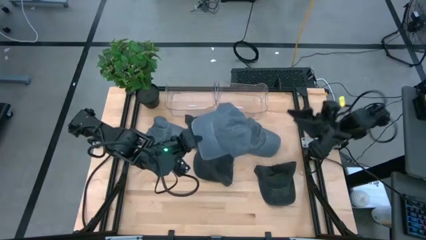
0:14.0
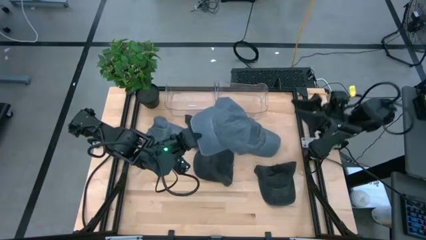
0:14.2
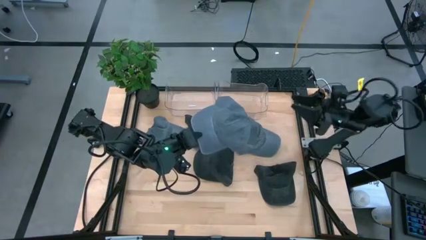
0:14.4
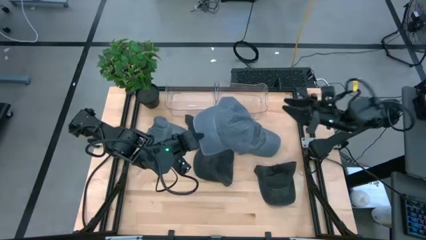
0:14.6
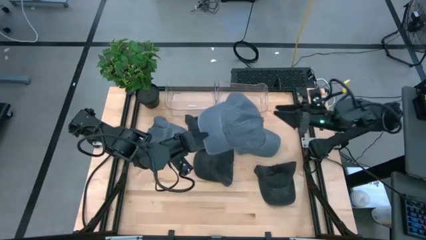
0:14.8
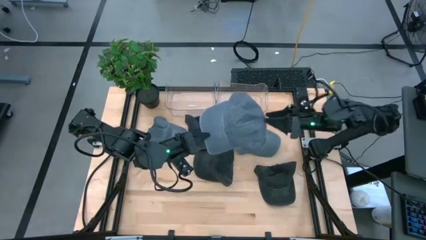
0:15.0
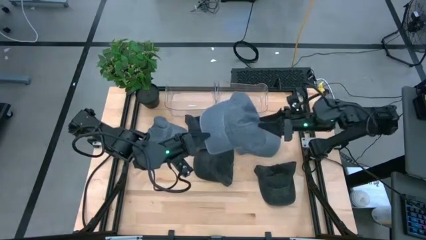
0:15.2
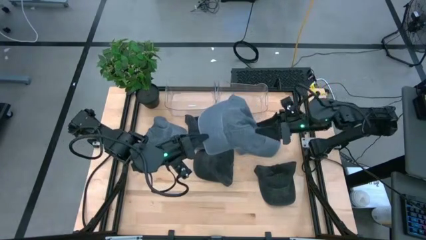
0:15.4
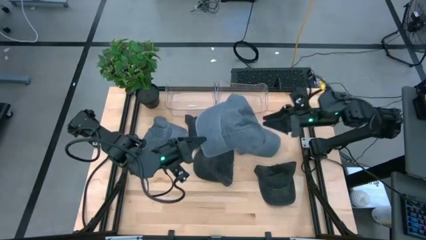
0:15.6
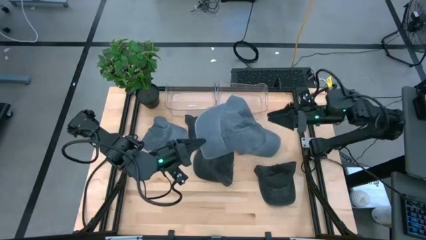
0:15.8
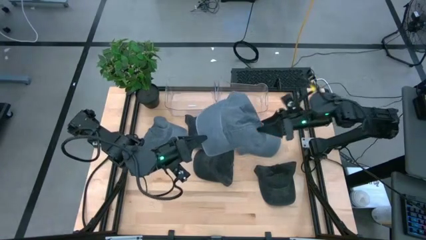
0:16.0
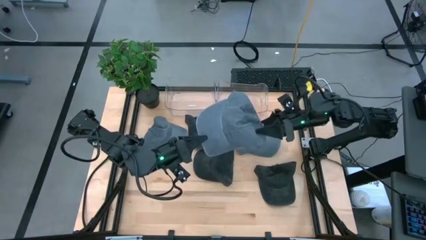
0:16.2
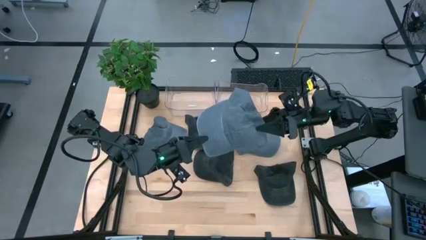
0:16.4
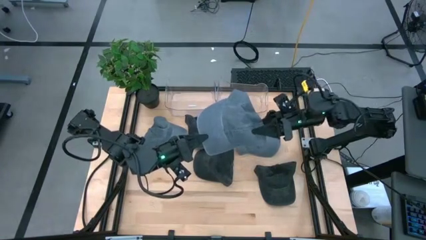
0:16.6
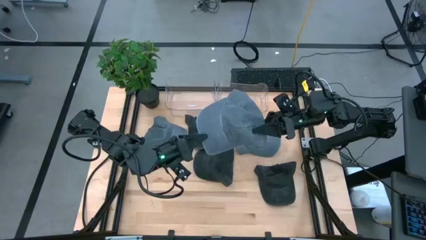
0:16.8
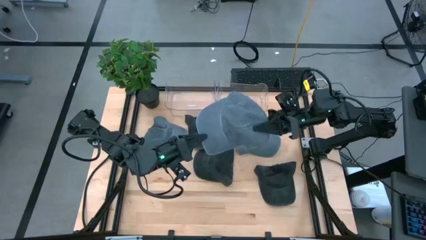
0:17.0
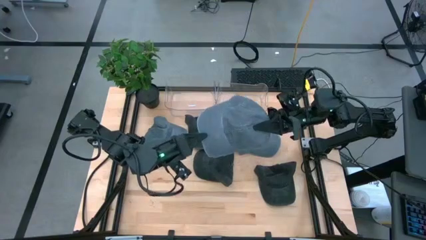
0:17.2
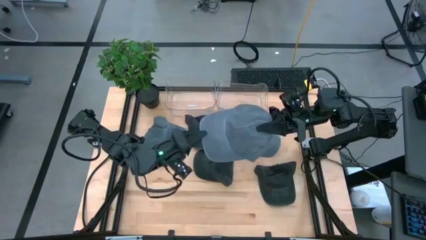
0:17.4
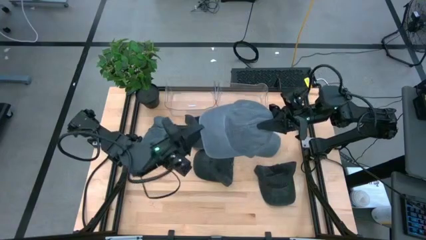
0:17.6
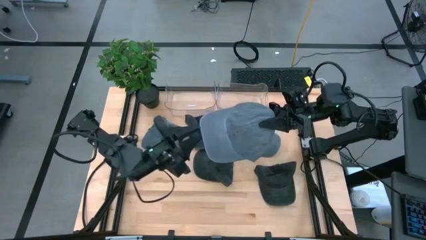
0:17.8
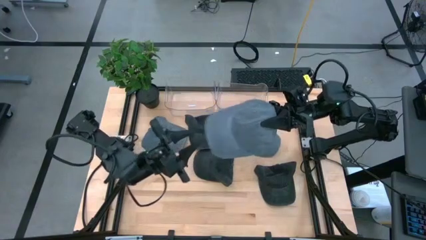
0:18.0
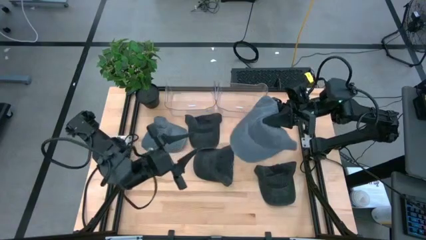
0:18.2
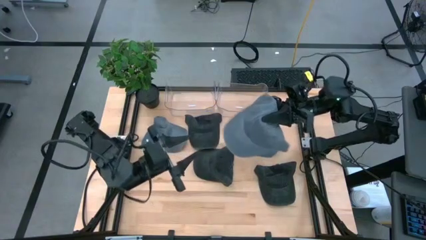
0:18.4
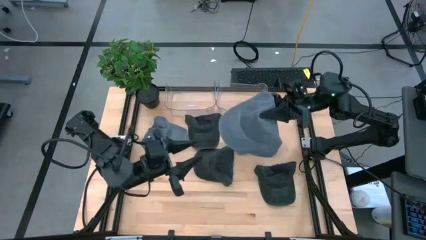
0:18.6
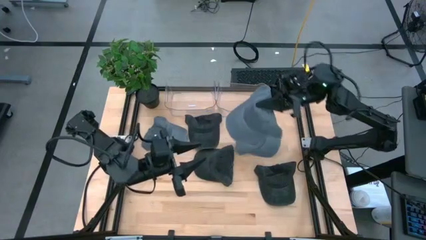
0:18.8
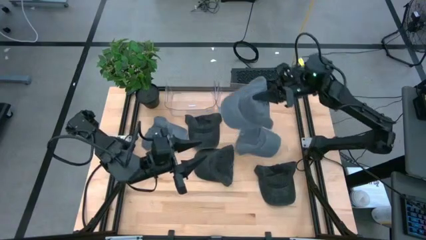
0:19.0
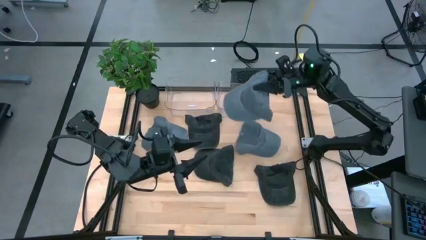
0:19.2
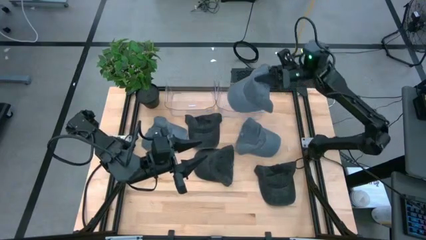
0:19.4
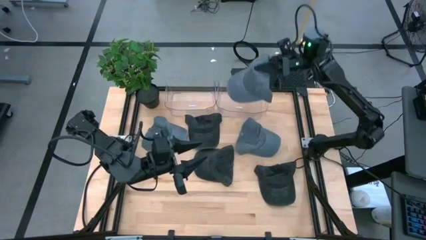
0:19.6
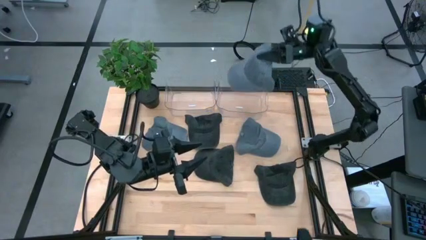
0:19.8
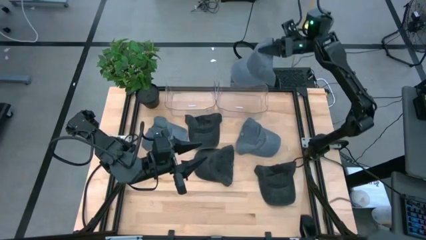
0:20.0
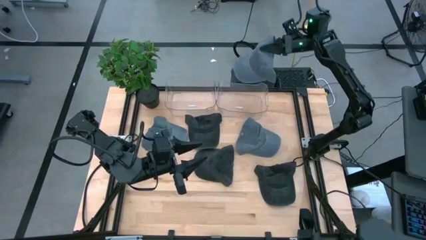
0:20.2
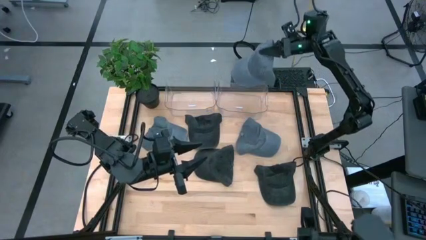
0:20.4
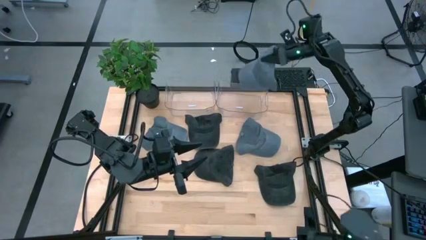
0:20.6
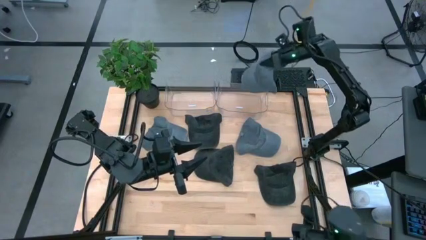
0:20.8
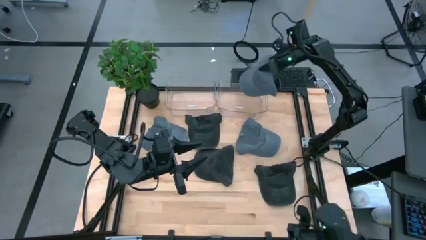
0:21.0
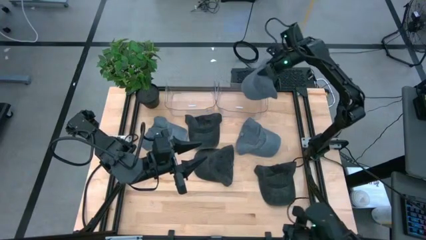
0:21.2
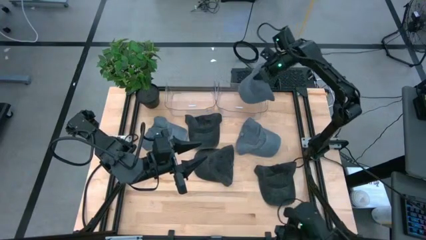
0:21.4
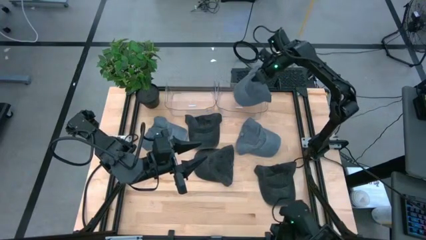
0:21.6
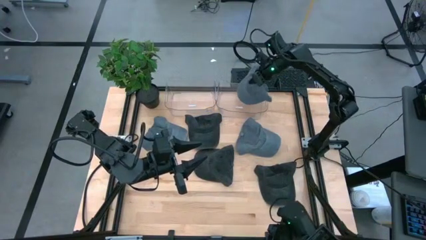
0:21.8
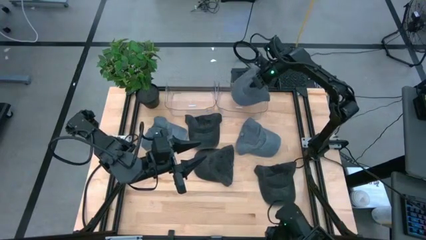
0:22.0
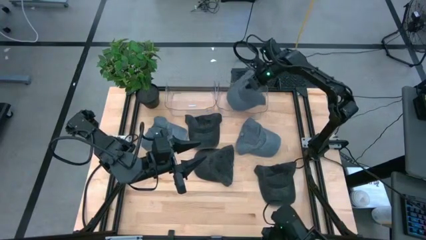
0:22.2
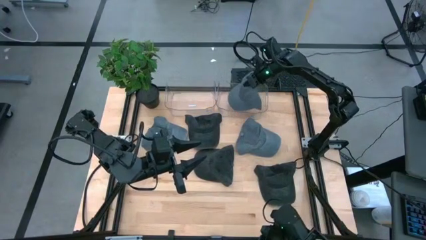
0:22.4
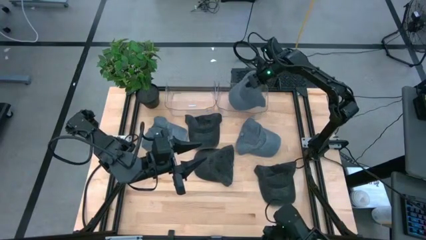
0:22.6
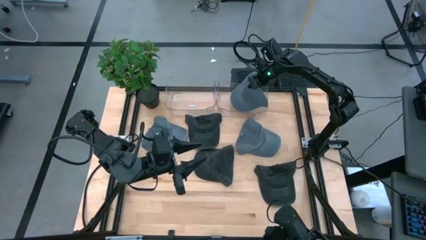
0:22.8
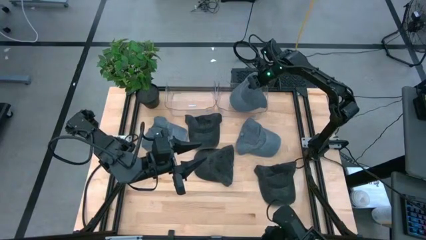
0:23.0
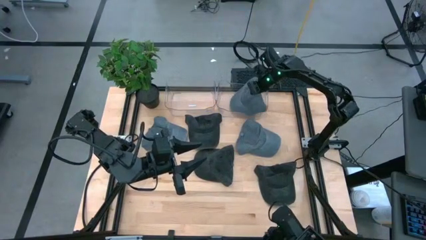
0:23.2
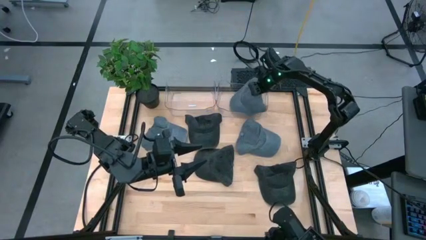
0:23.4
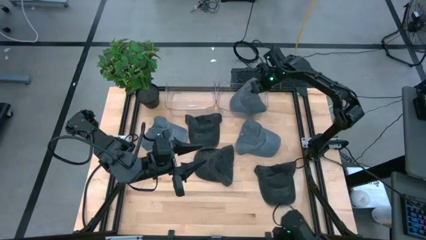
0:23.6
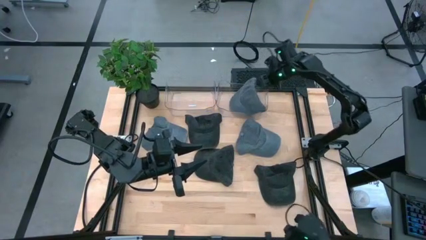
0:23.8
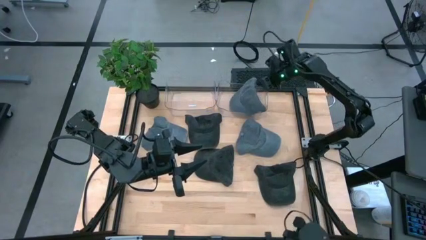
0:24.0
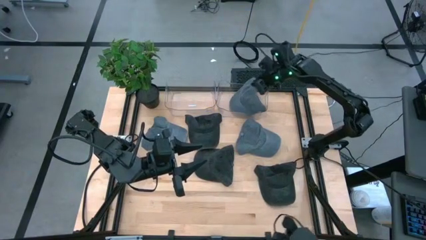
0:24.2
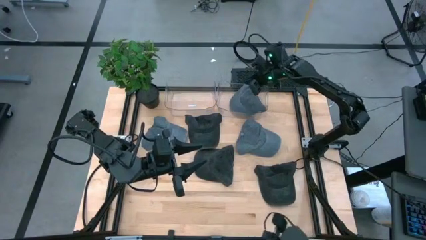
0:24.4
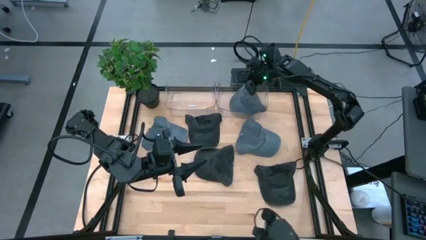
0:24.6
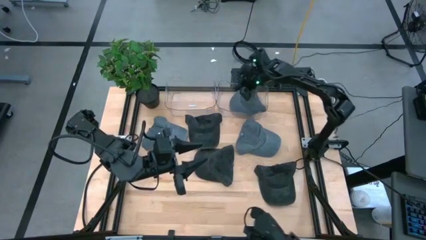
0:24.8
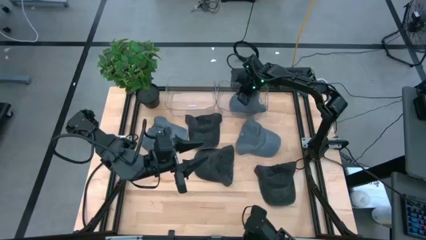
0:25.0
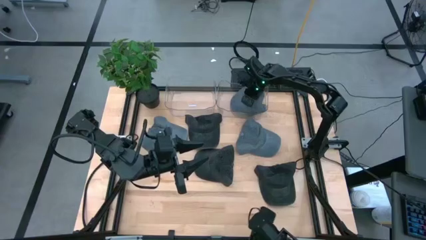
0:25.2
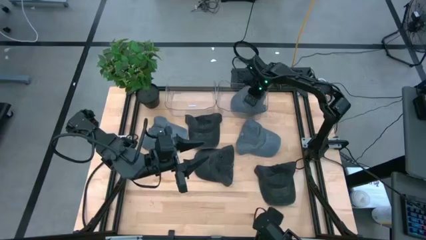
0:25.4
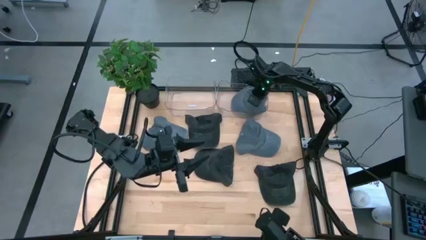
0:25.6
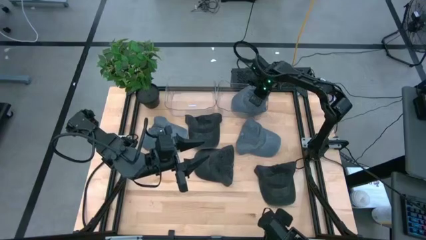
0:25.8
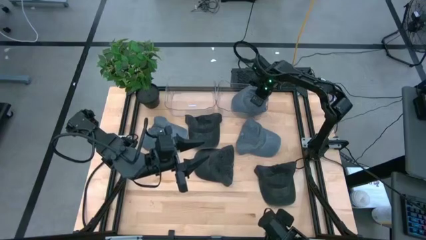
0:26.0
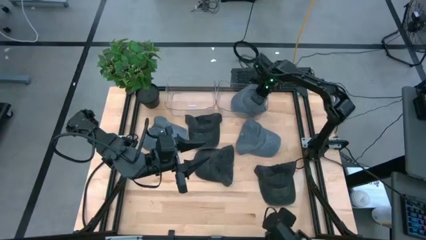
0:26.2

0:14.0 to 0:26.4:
Task: Pick & Place hat
Put the bottom left blue cap into the right transparent bin
